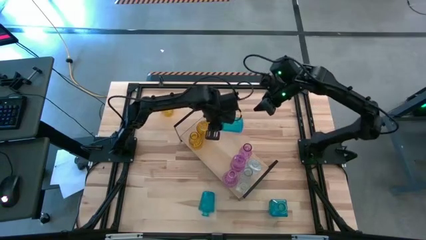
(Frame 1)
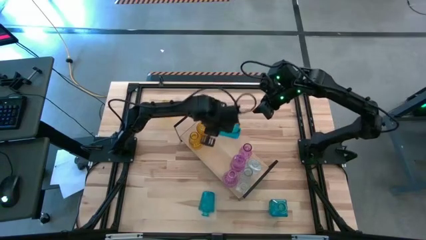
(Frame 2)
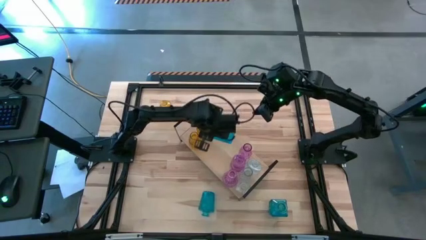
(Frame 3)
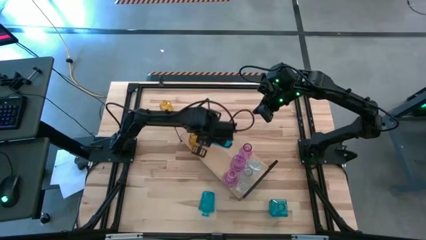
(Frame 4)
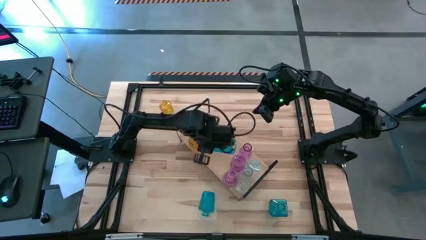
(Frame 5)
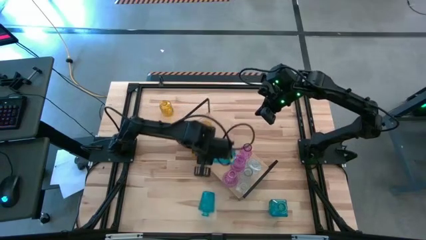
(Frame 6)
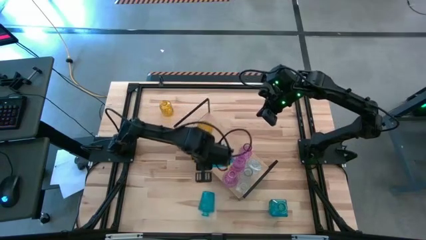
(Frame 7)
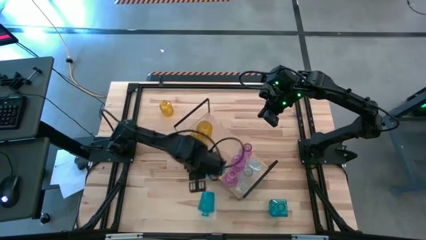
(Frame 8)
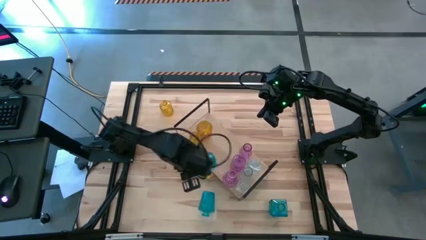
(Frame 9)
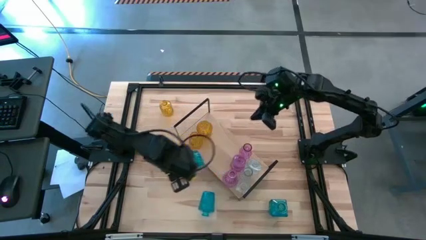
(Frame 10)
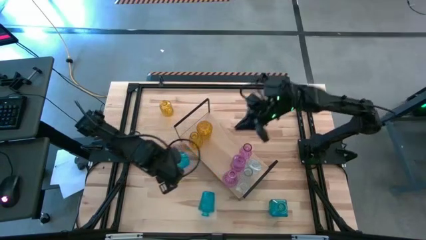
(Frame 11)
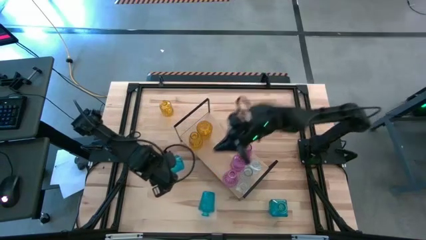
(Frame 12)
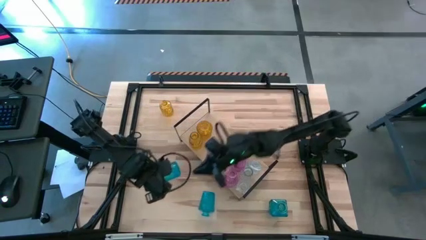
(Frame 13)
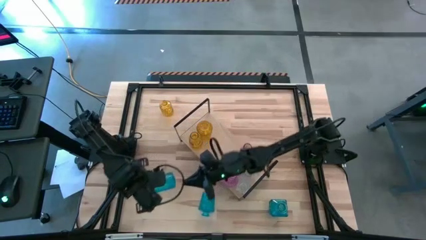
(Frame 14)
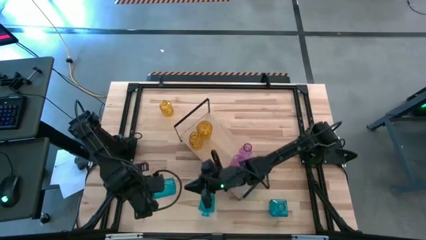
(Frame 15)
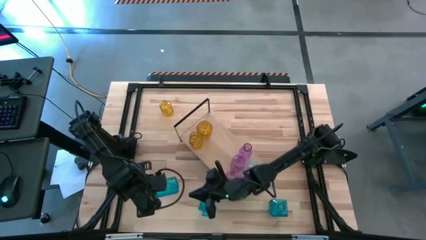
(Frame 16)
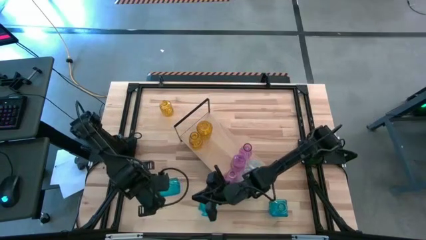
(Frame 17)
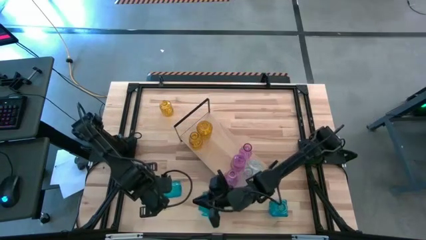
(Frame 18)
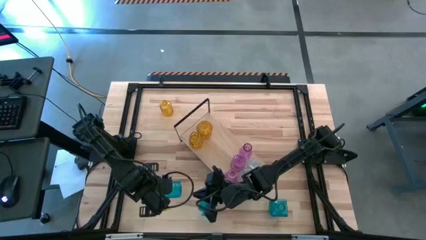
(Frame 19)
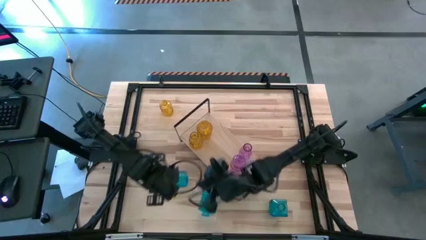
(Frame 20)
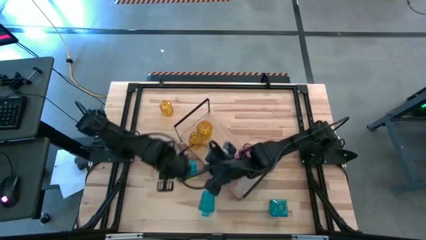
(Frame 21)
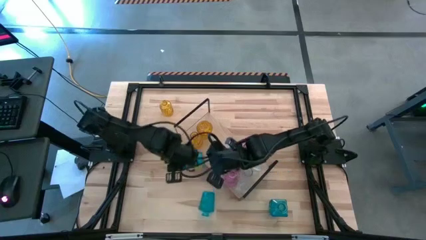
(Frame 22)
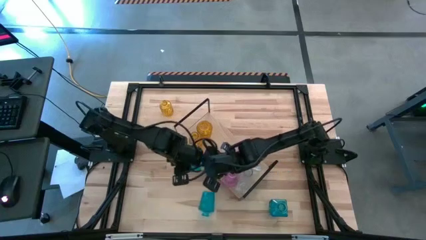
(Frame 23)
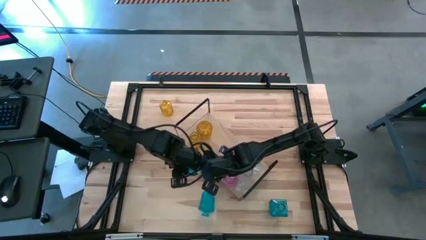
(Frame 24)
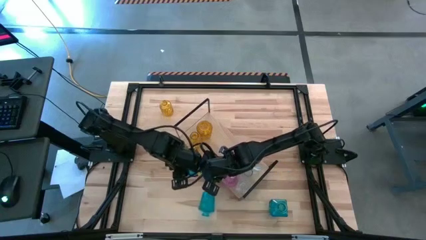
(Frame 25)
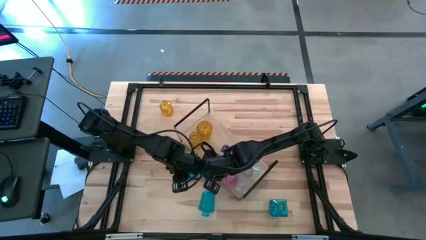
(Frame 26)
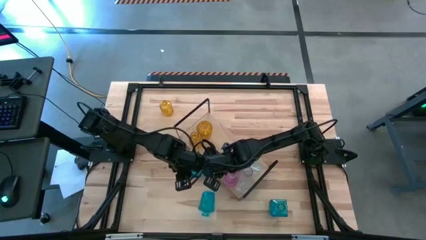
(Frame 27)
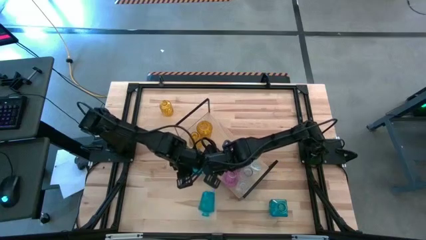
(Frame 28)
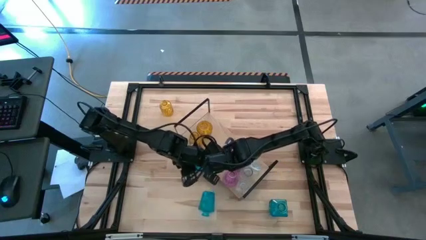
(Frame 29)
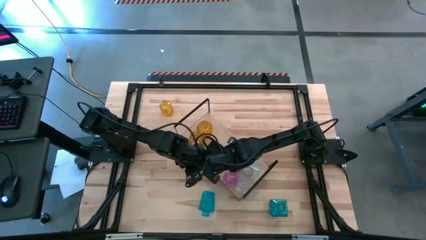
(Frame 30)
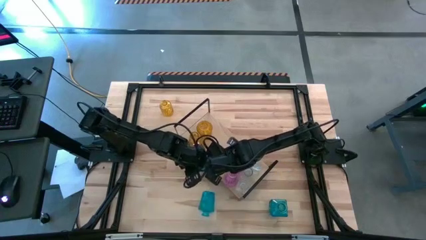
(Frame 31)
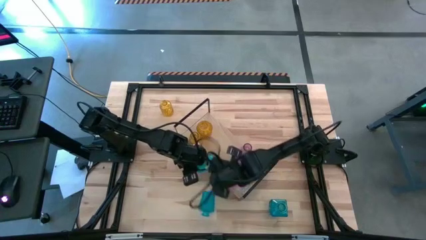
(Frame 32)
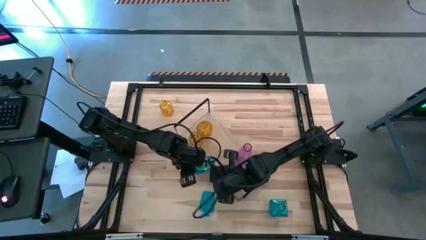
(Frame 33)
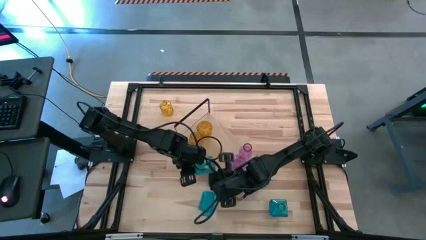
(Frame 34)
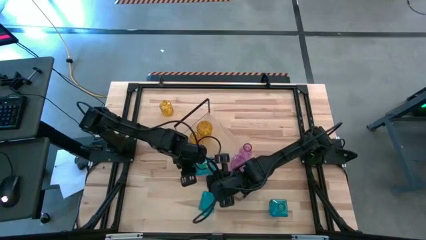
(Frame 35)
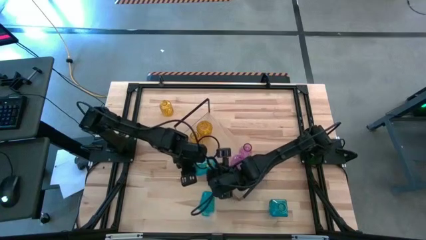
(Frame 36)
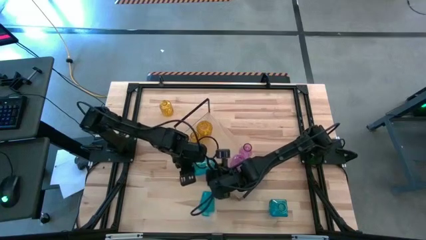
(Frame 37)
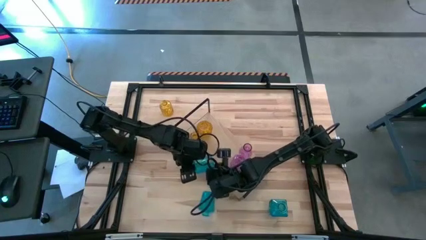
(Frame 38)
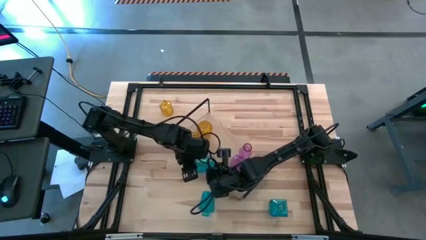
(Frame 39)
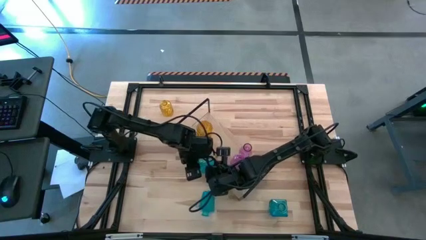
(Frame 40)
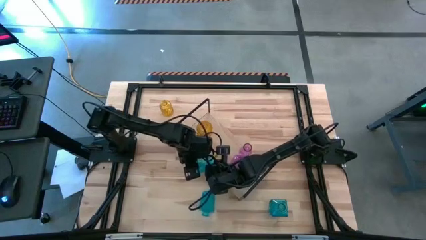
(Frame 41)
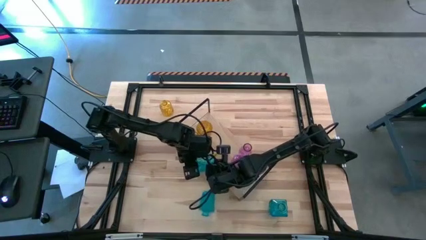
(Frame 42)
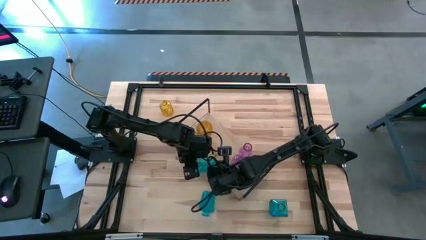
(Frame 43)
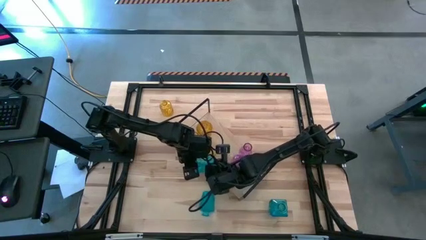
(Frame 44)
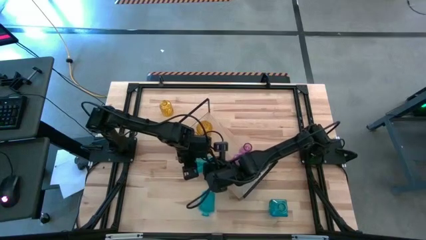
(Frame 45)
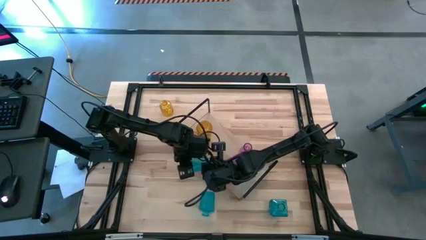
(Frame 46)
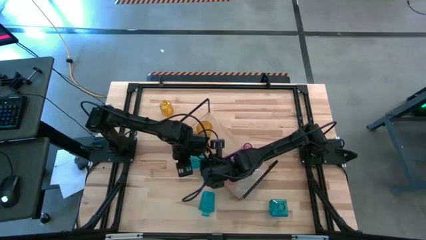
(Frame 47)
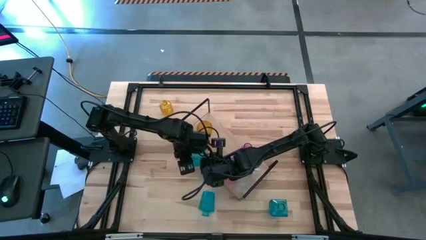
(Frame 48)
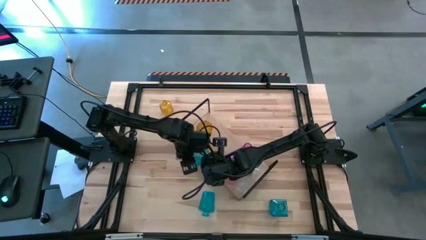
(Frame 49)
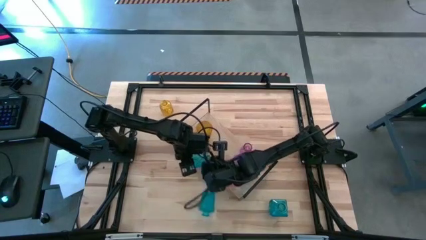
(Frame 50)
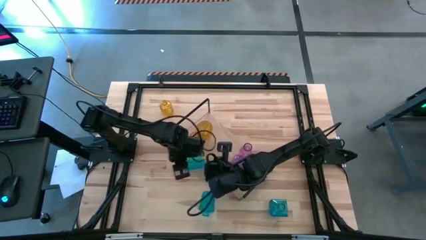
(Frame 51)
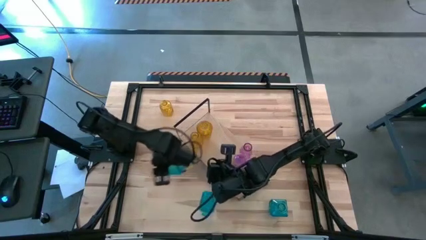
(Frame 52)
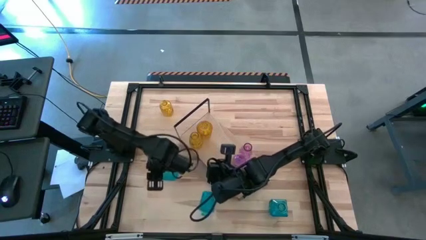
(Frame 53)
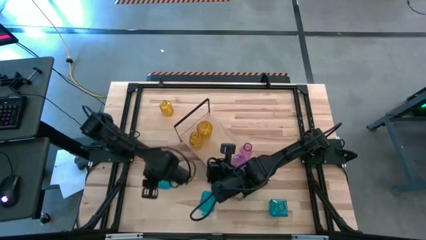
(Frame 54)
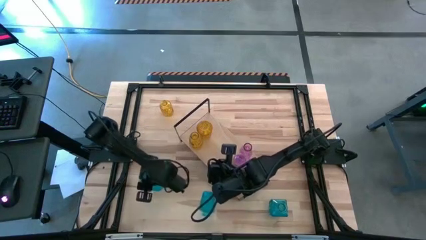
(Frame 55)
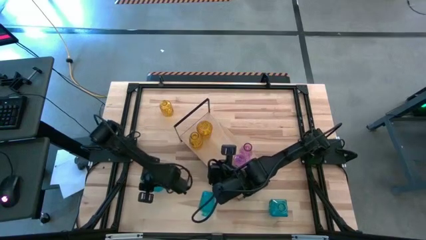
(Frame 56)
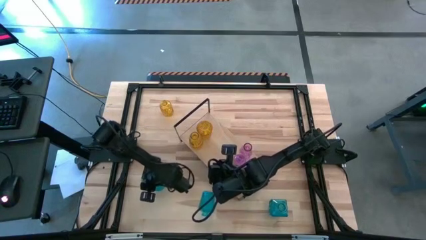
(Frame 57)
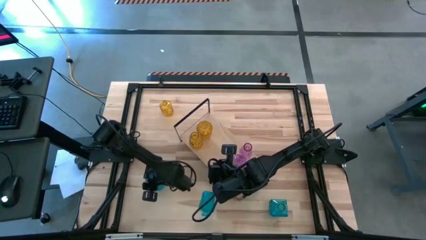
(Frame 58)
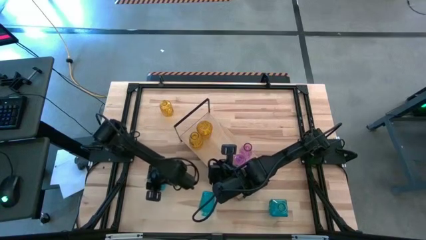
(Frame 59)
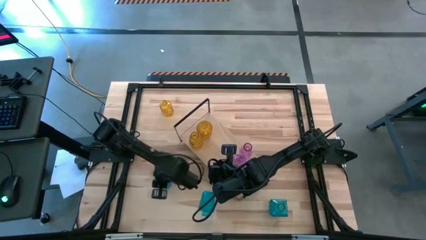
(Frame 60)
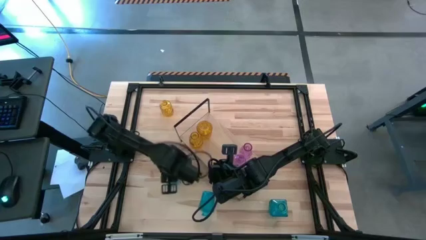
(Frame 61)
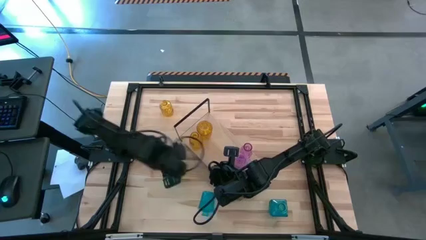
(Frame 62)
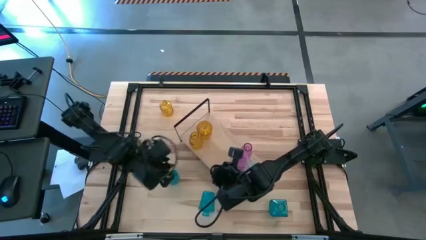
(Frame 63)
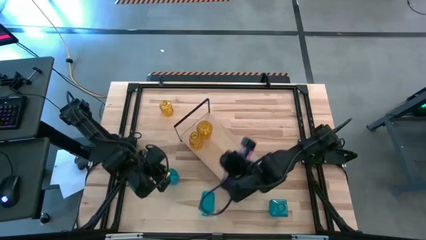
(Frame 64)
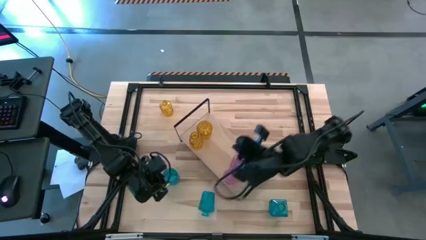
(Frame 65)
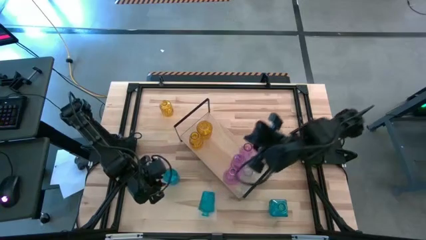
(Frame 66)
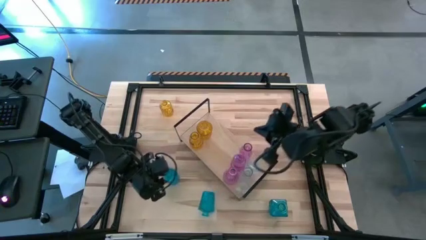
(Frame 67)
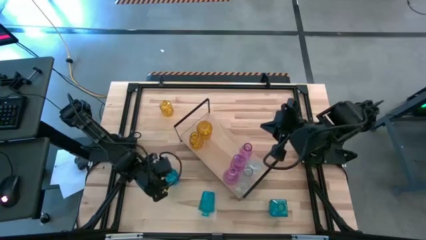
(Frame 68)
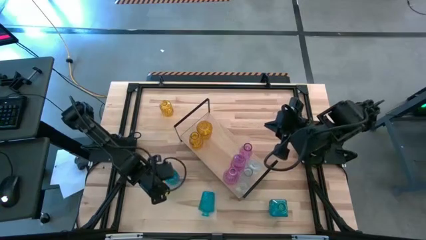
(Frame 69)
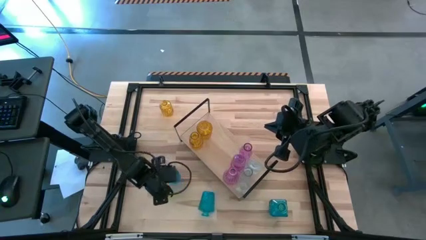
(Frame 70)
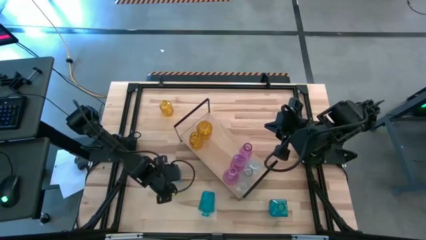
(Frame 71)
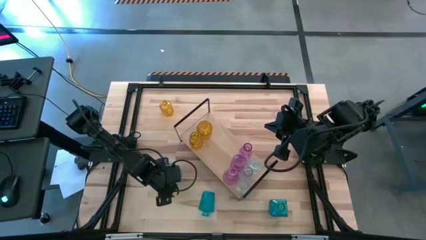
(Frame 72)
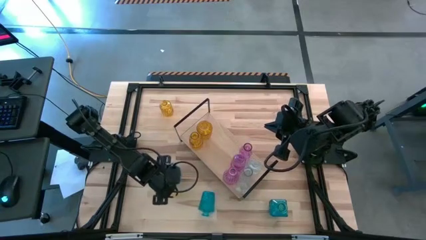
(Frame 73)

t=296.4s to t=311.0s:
Task: sort vases onto shelf
Put the left blue crystal vase on the shelf
